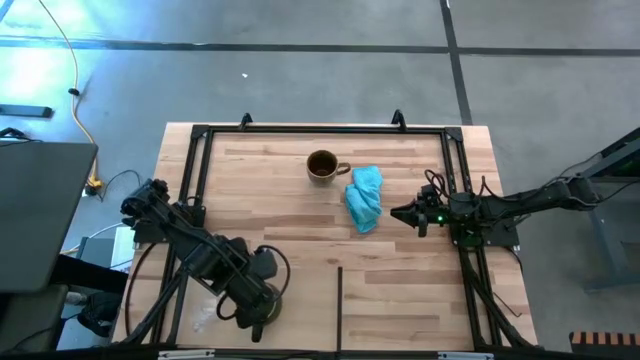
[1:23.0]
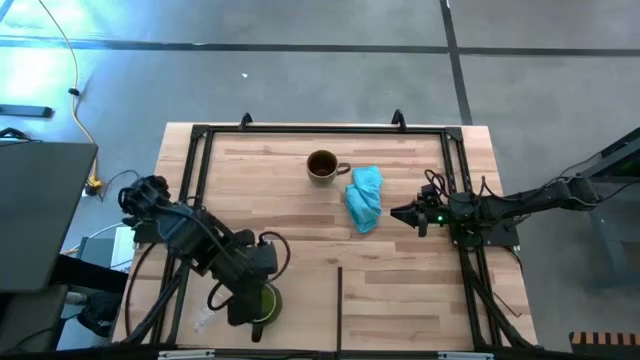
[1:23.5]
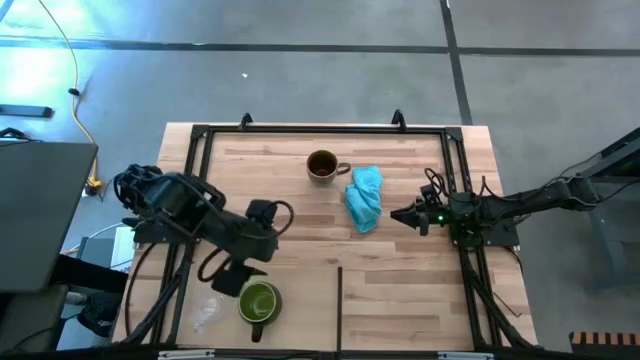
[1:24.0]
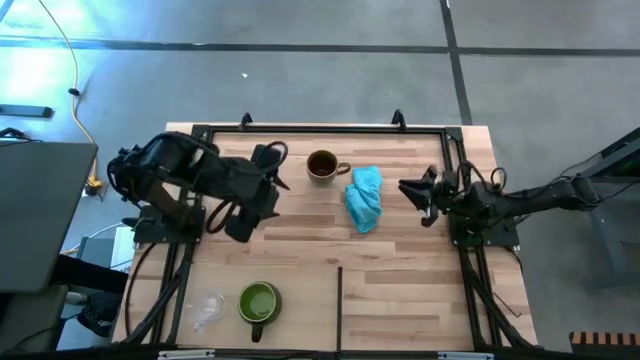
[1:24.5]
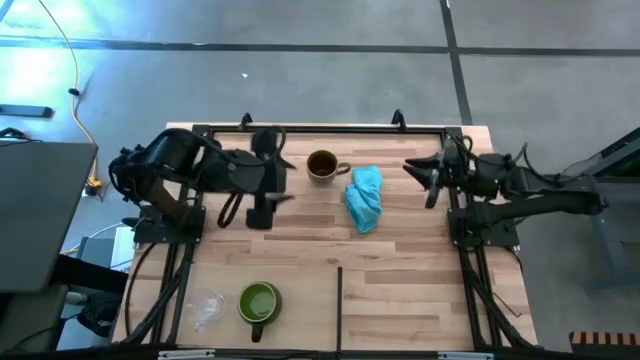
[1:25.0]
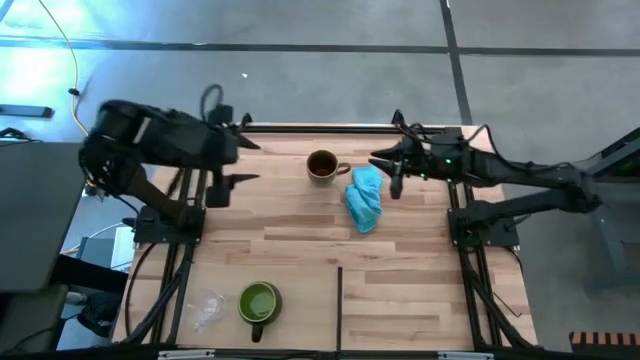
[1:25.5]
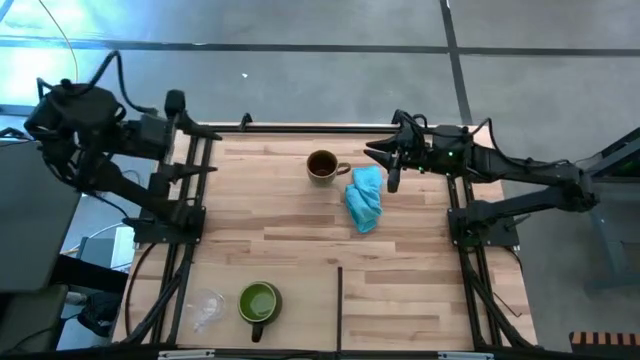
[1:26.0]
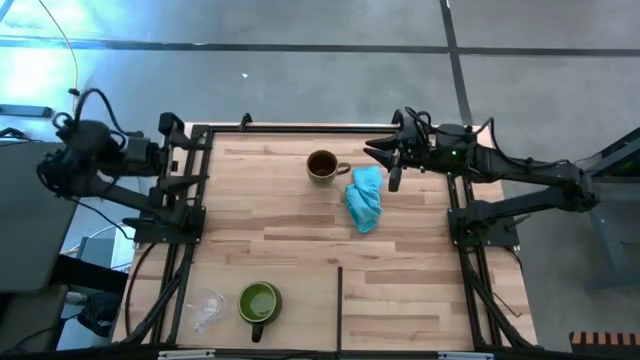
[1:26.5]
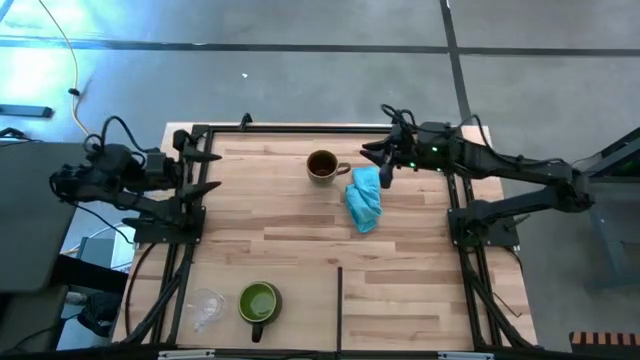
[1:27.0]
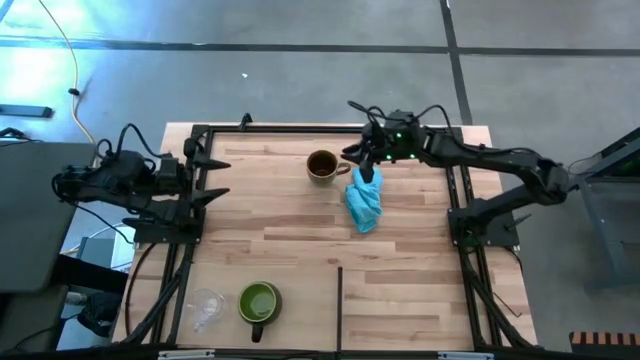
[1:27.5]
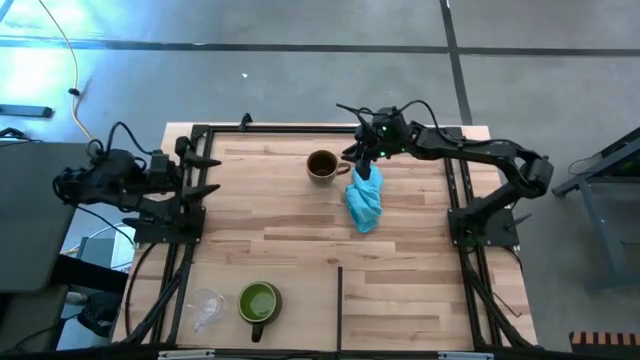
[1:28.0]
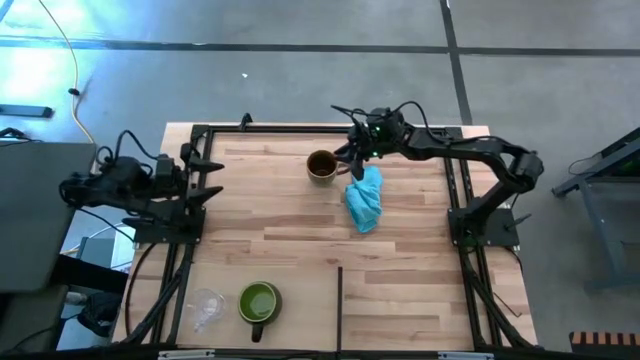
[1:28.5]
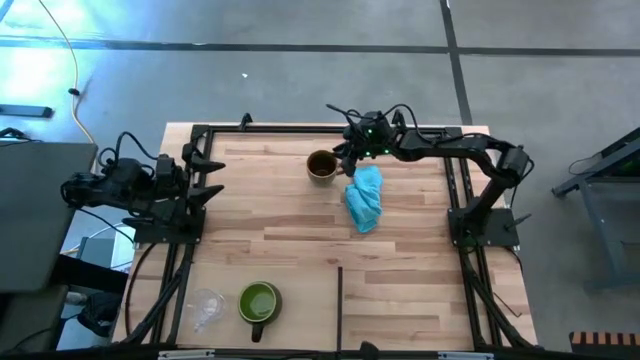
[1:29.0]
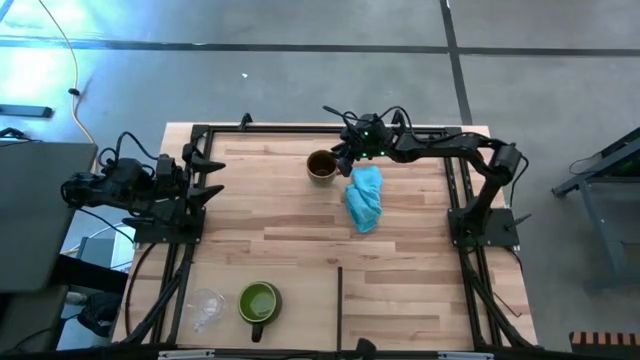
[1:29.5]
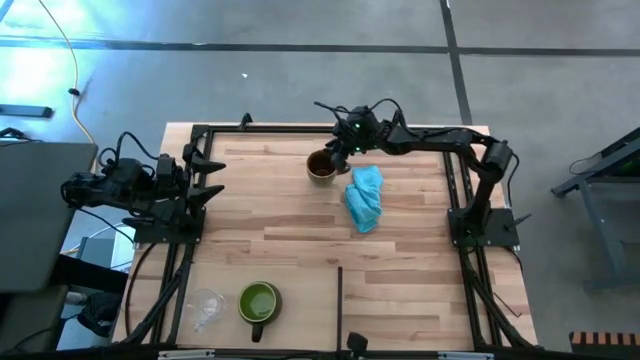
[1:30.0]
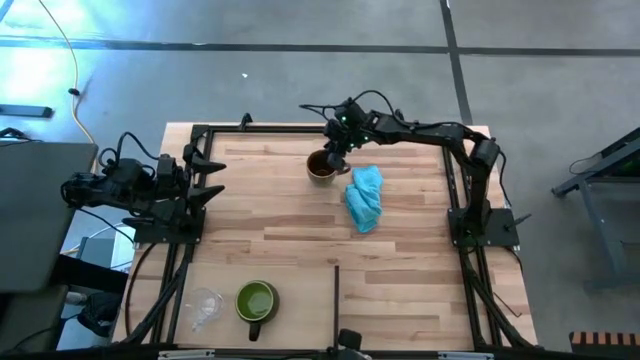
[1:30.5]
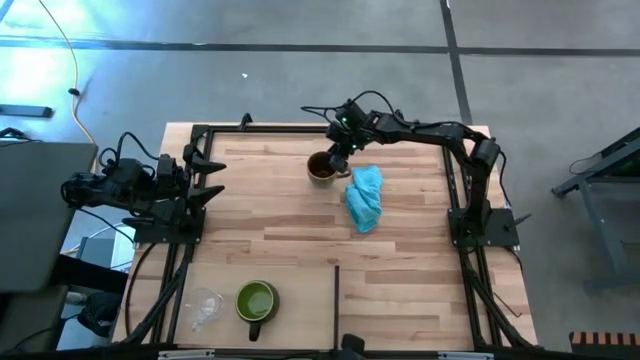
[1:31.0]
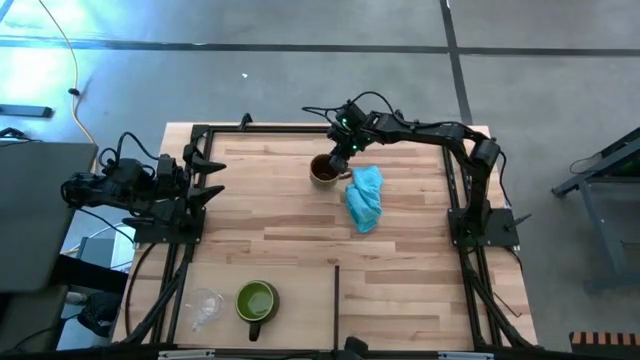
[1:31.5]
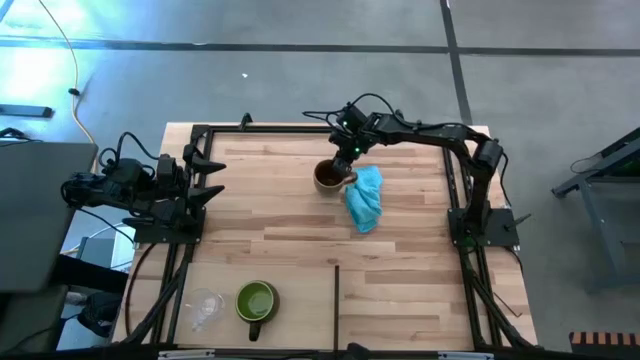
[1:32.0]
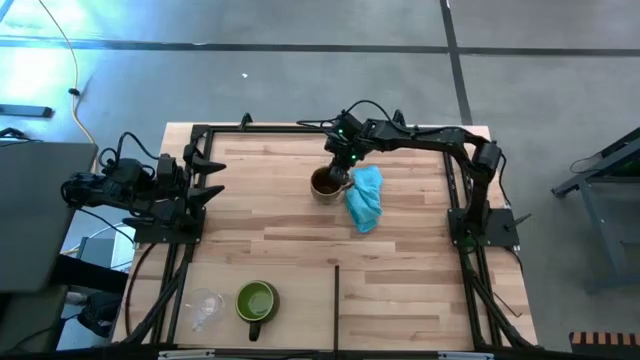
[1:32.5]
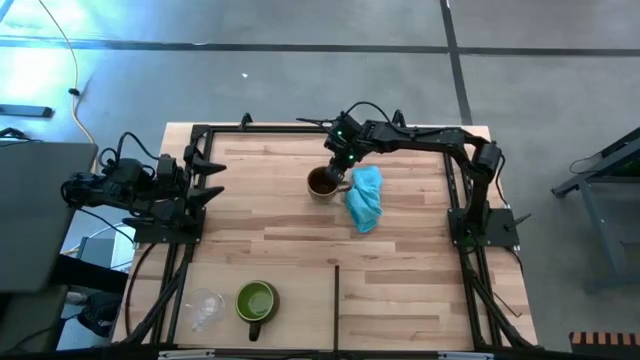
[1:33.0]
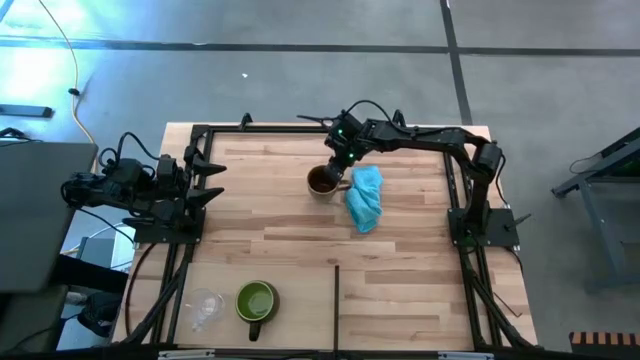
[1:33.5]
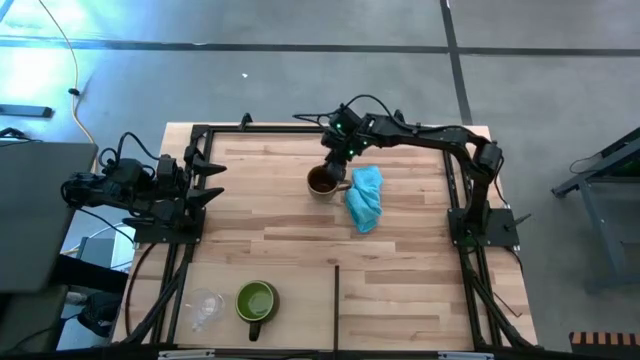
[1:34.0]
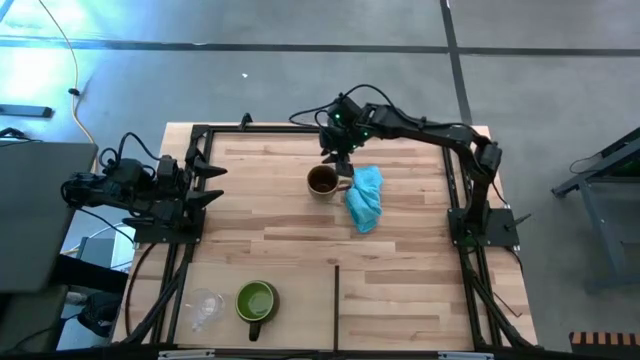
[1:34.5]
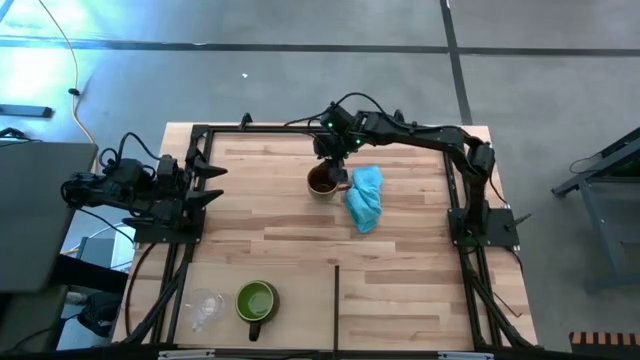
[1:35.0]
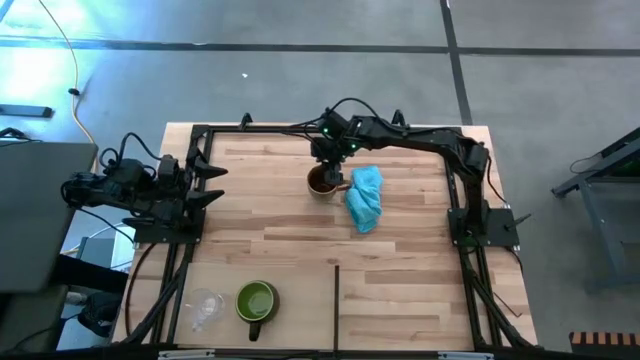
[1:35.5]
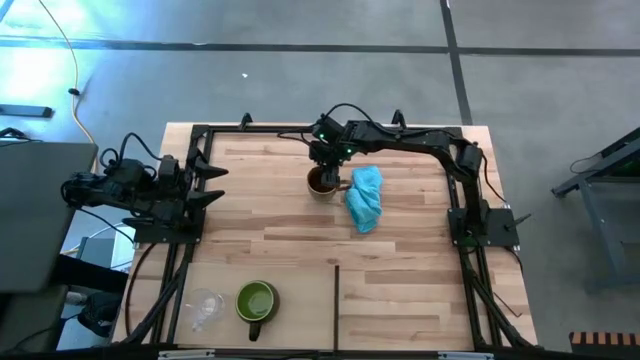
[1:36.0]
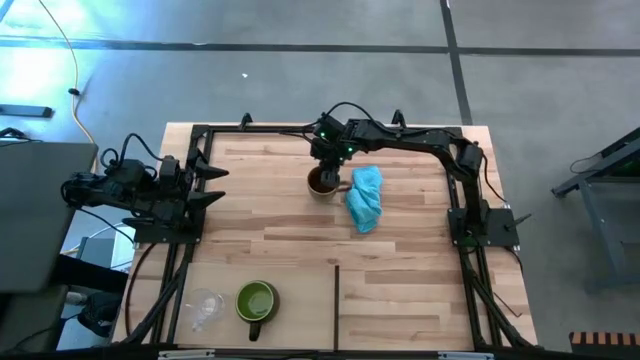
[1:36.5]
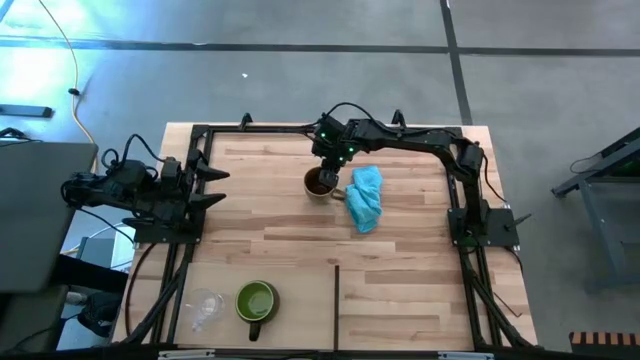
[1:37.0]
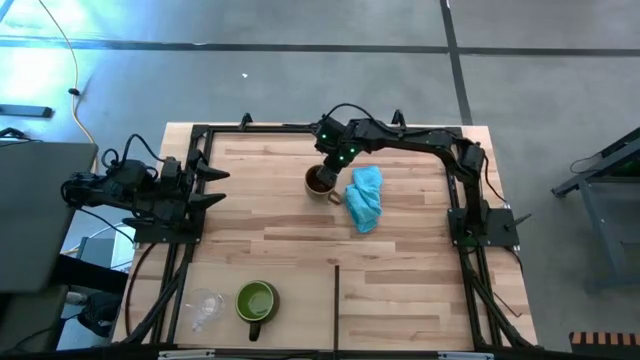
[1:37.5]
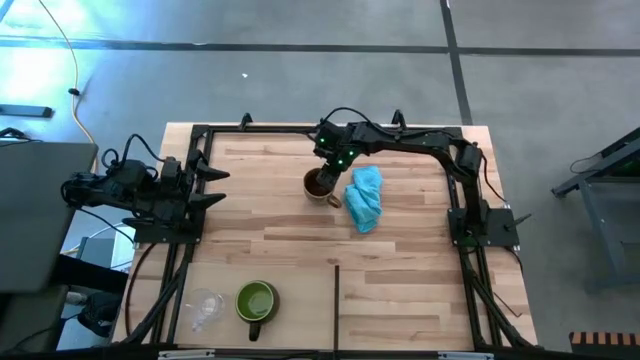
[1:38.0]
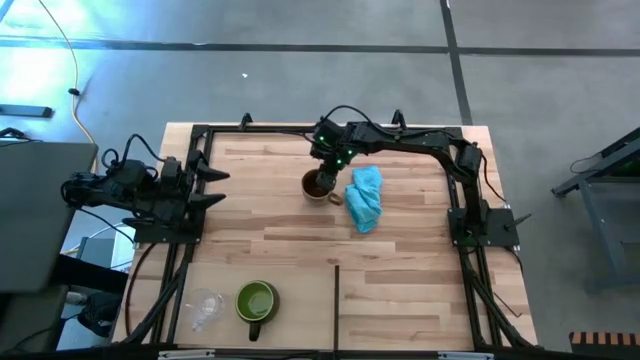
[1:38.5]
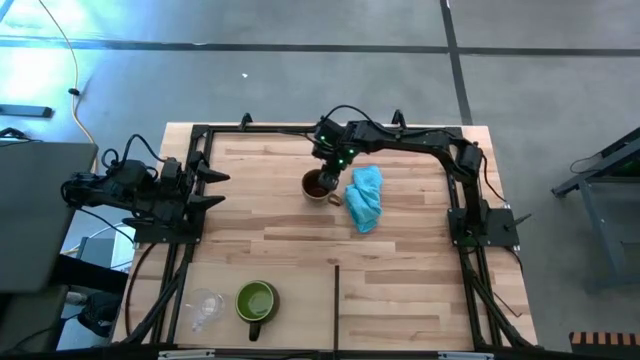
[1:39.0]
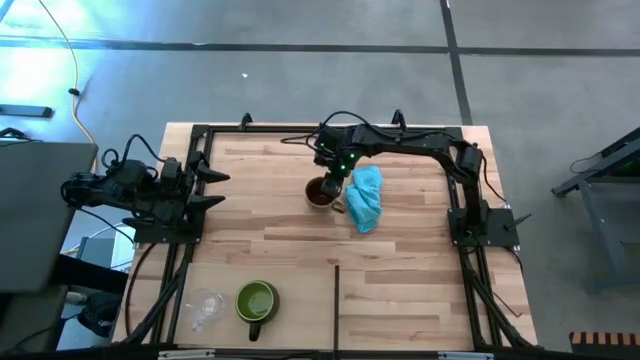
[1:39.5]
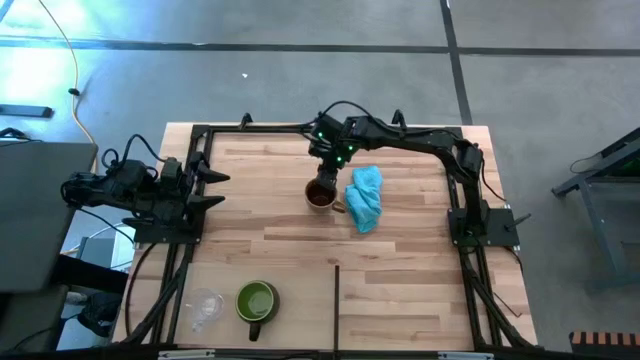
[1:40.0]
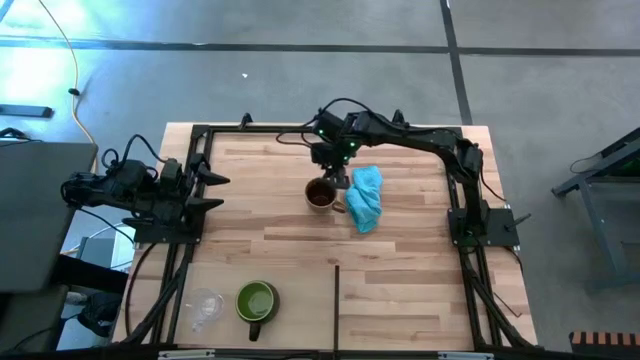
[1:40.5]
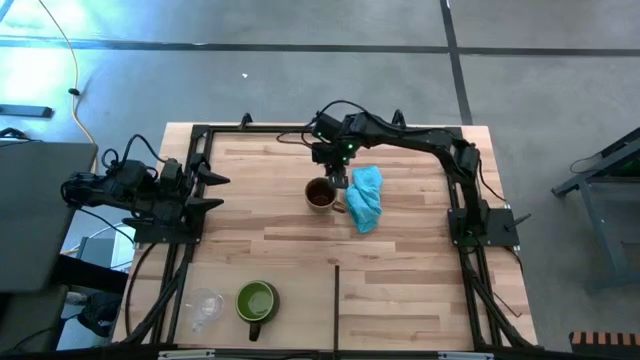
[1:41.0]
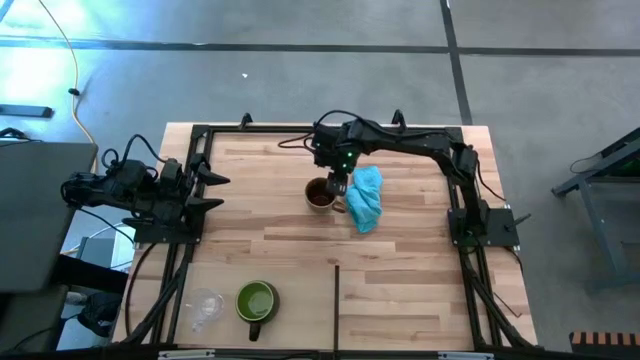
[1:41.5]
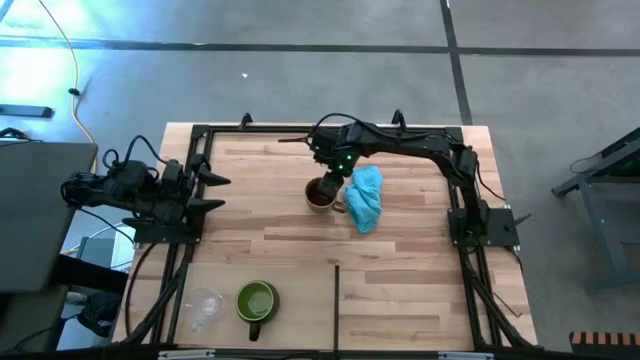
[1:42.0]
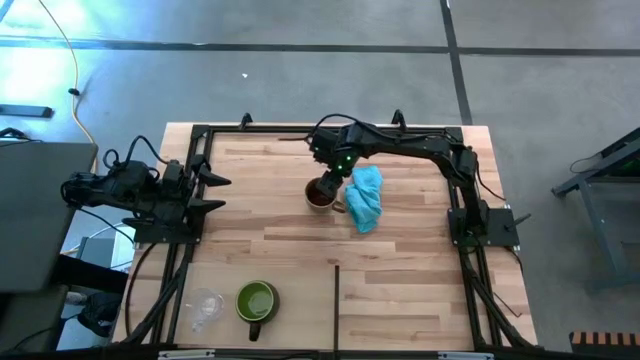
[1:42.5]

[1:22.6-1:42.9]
Task: Stack small to large cups/mugs on shelf
Put the brown mug on the shelf

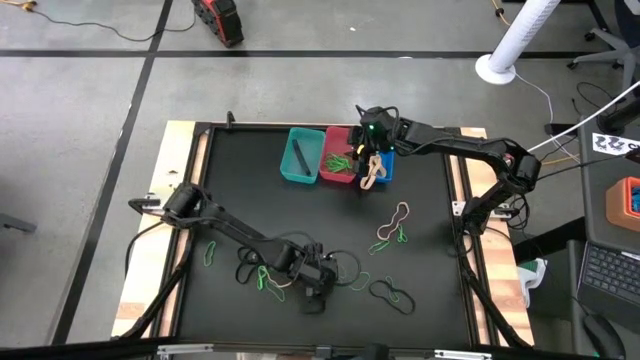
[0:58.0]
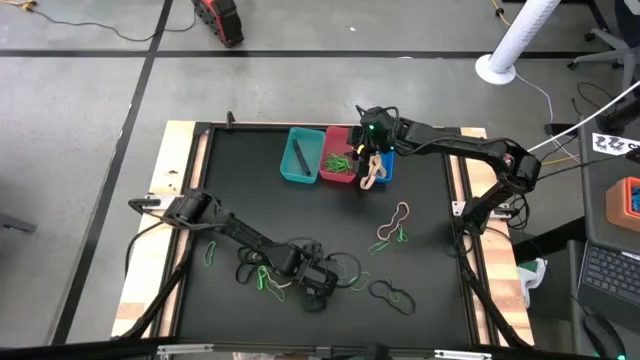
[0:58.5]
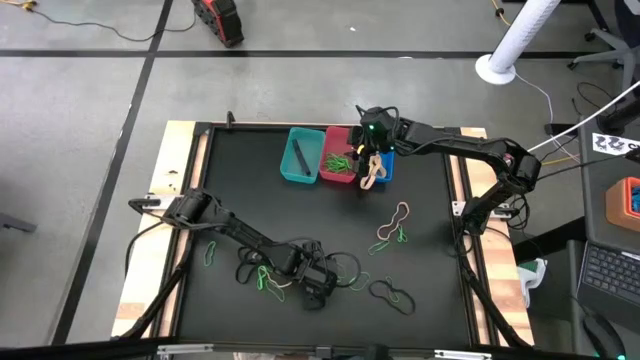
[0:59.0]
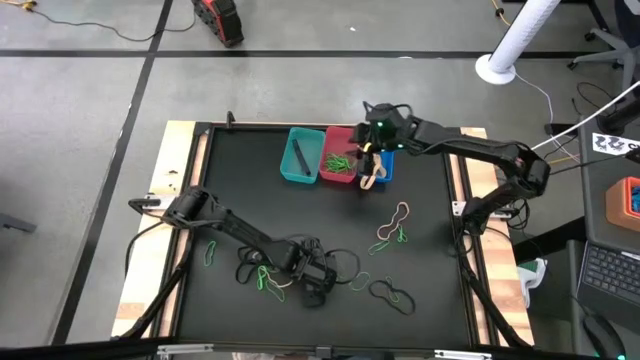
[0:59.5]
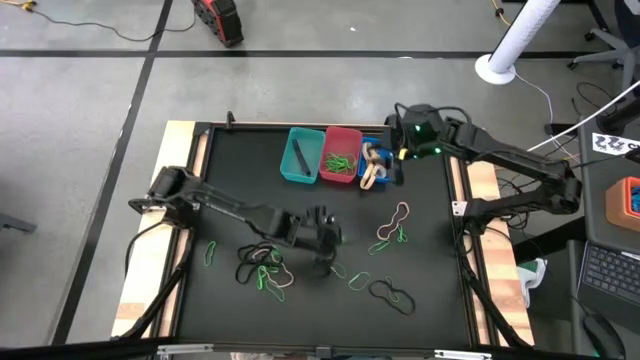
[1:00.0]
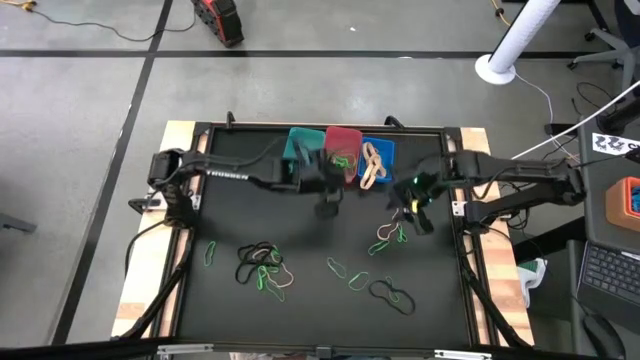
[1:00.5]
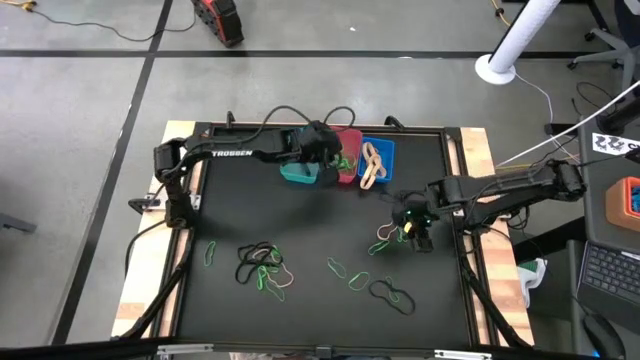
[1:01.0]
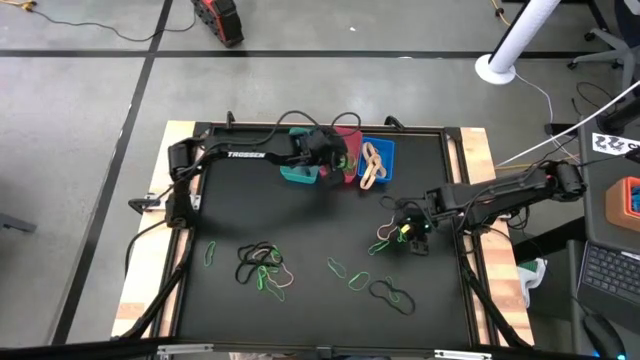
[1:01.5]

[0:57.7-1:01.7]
Task: Sort rubber bands into baskets
Put the green rubber band into the pink bin
